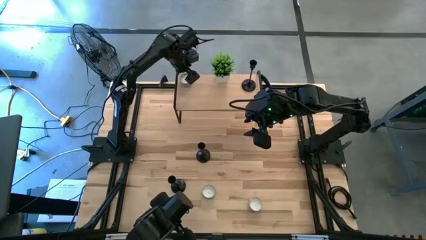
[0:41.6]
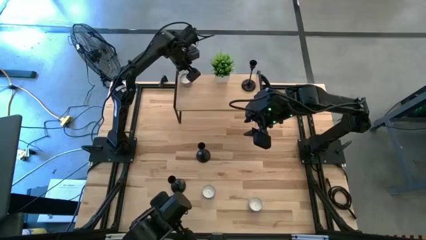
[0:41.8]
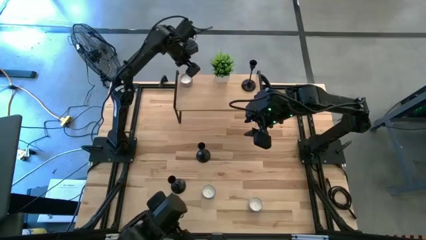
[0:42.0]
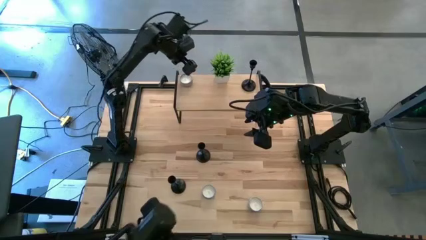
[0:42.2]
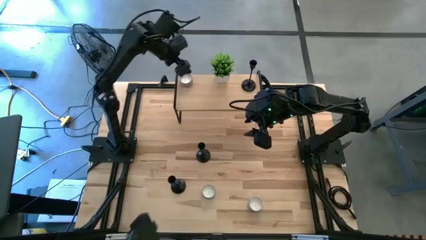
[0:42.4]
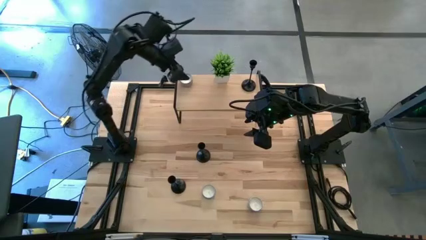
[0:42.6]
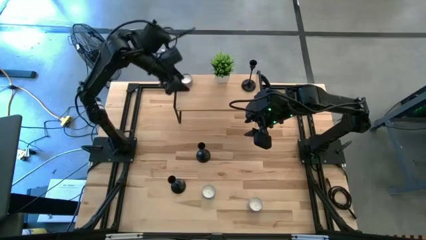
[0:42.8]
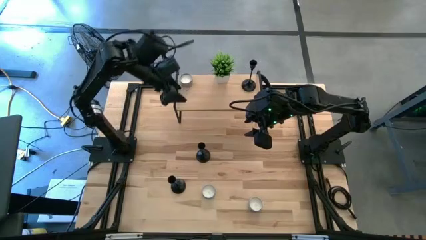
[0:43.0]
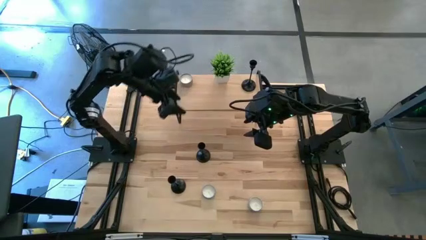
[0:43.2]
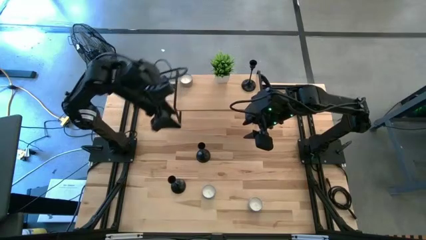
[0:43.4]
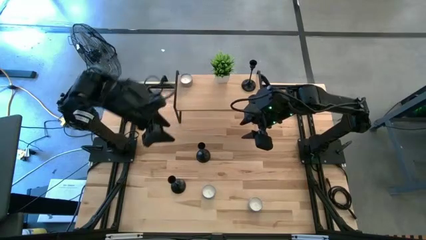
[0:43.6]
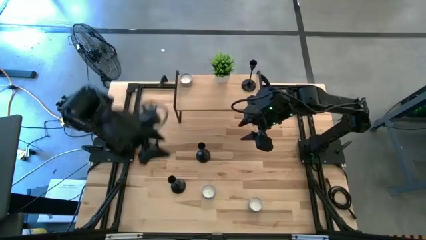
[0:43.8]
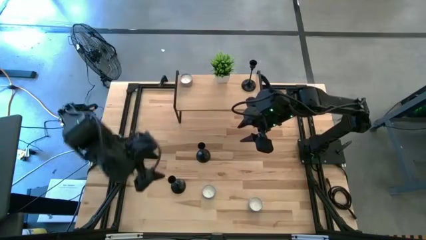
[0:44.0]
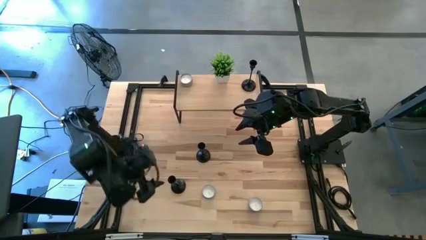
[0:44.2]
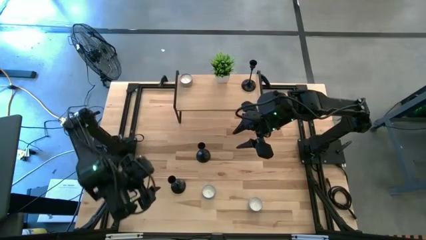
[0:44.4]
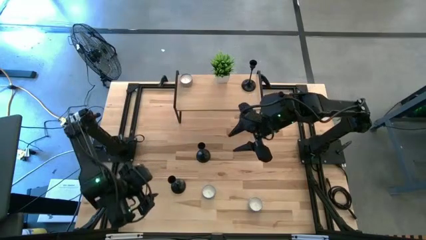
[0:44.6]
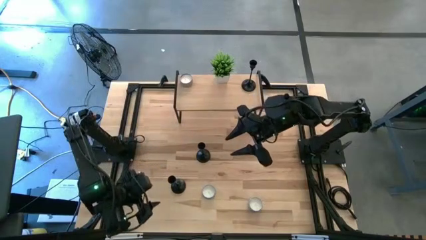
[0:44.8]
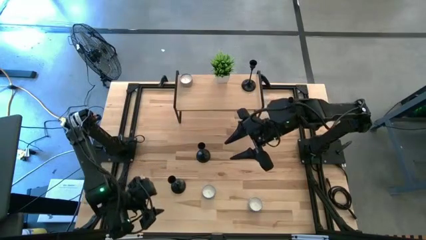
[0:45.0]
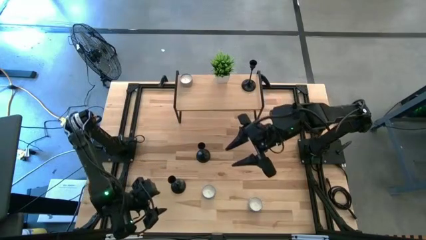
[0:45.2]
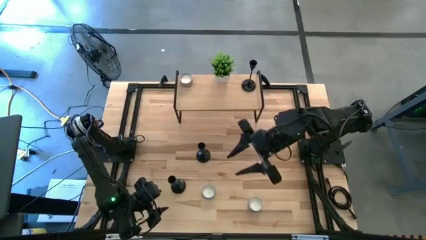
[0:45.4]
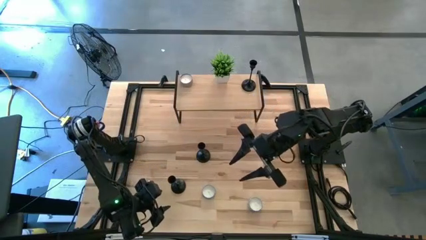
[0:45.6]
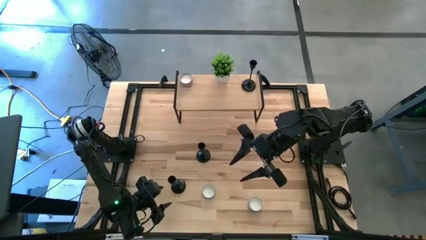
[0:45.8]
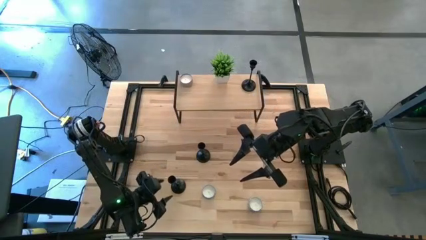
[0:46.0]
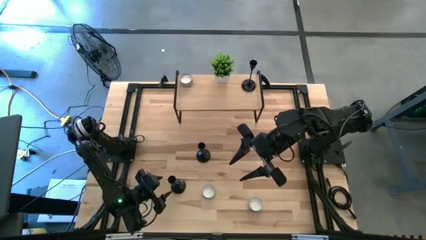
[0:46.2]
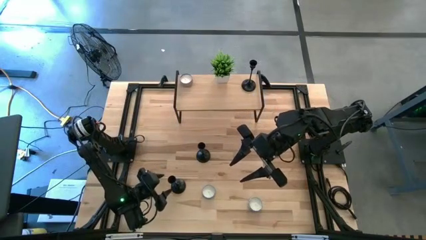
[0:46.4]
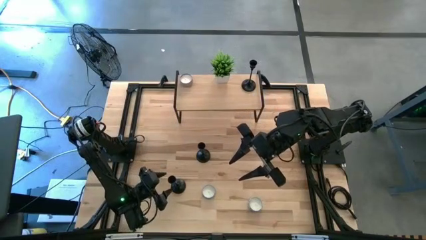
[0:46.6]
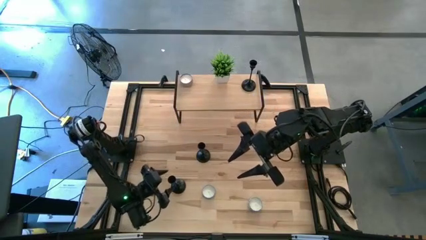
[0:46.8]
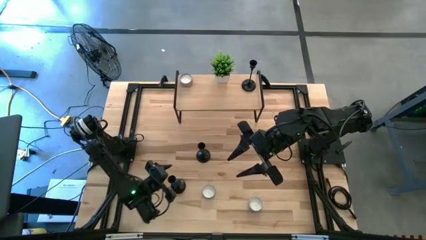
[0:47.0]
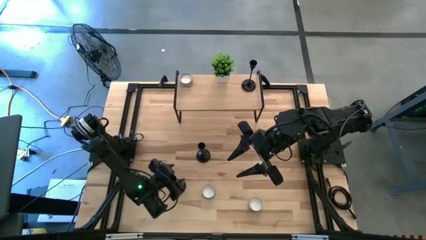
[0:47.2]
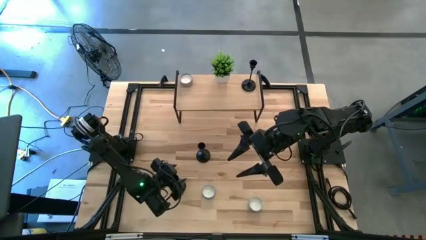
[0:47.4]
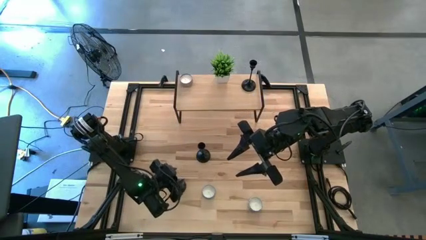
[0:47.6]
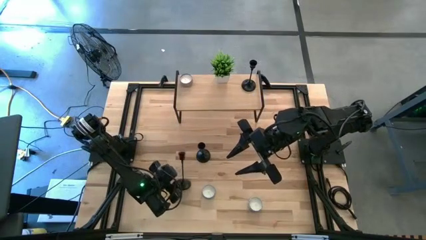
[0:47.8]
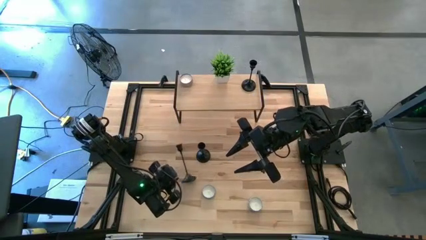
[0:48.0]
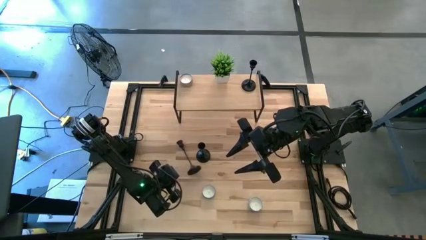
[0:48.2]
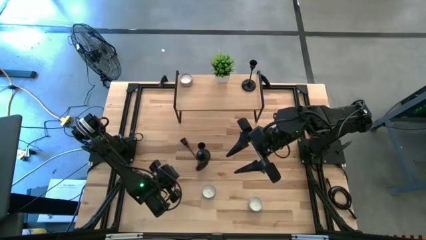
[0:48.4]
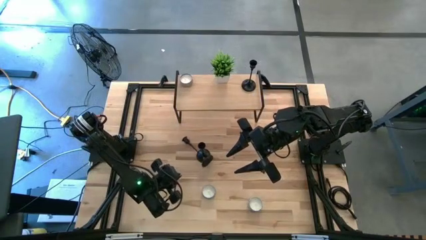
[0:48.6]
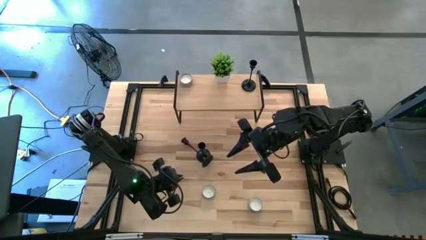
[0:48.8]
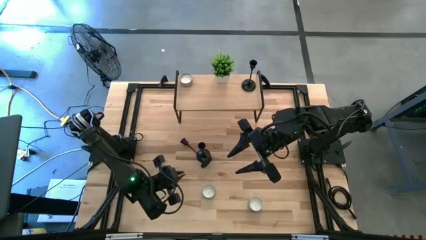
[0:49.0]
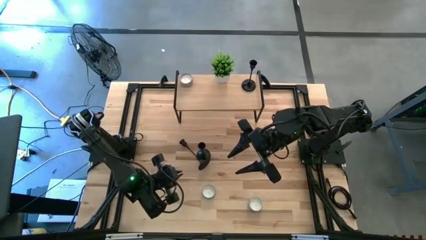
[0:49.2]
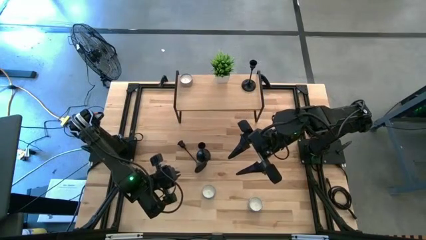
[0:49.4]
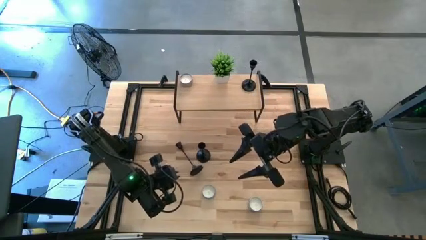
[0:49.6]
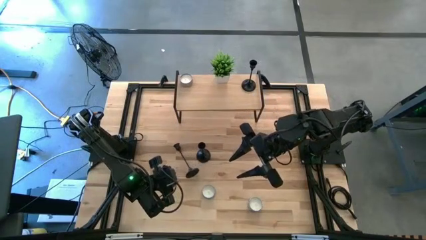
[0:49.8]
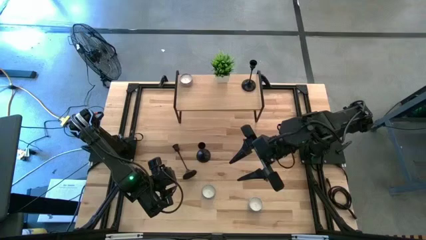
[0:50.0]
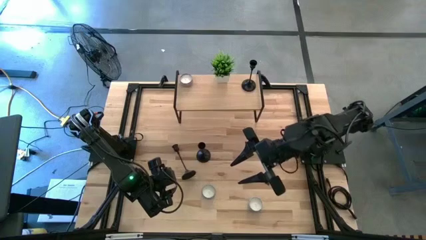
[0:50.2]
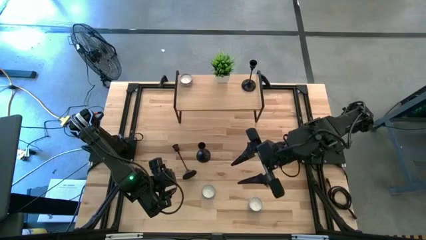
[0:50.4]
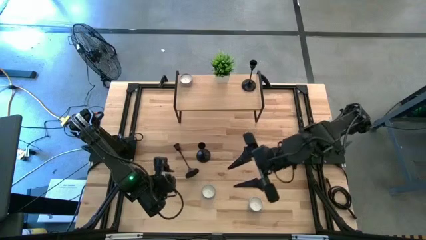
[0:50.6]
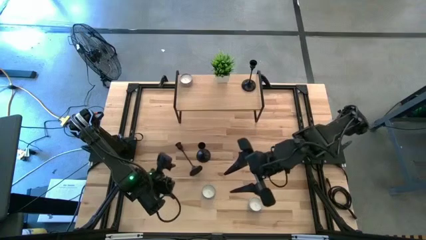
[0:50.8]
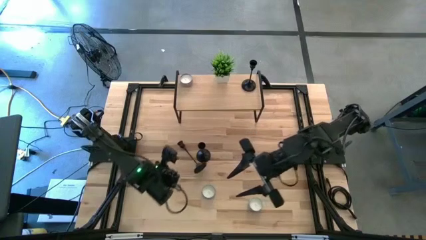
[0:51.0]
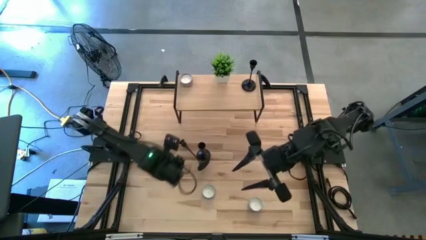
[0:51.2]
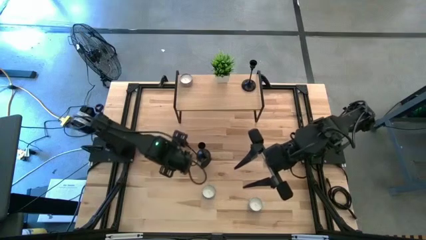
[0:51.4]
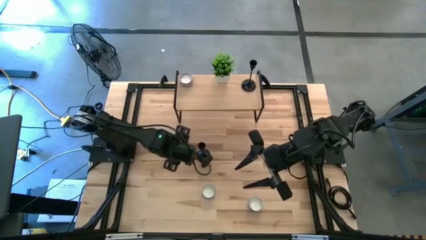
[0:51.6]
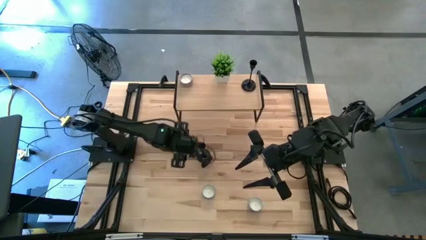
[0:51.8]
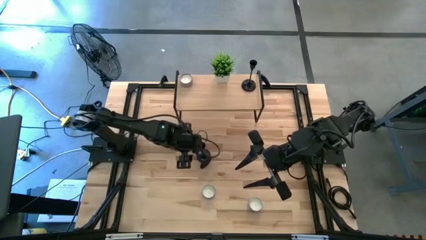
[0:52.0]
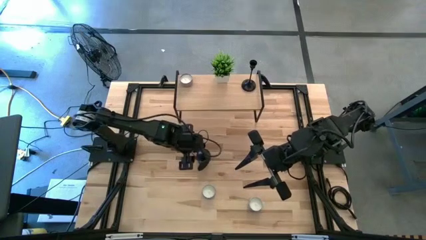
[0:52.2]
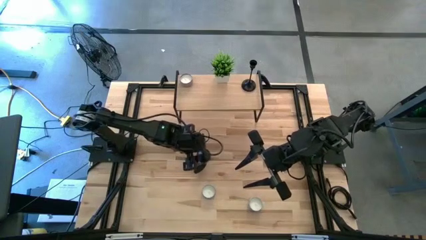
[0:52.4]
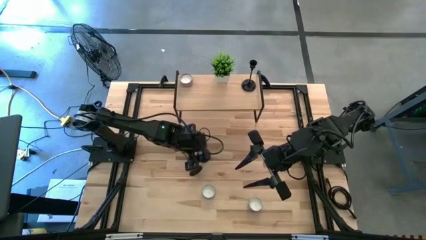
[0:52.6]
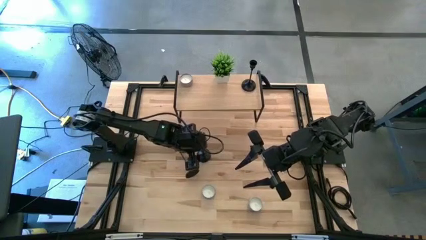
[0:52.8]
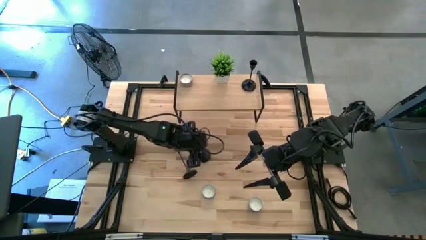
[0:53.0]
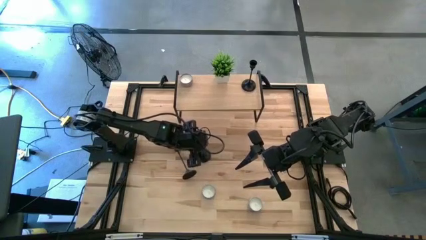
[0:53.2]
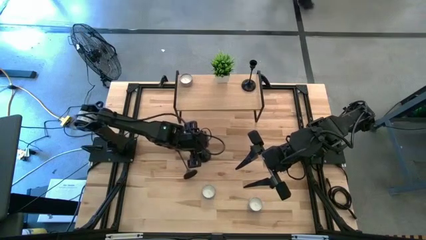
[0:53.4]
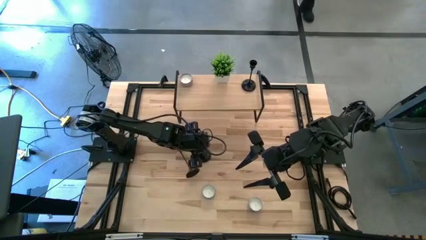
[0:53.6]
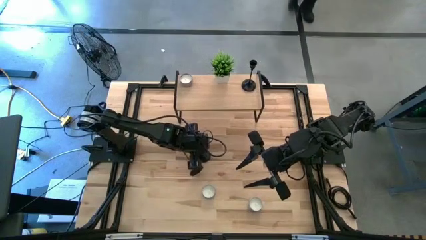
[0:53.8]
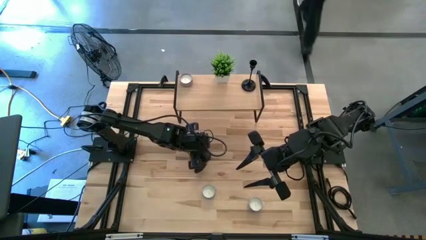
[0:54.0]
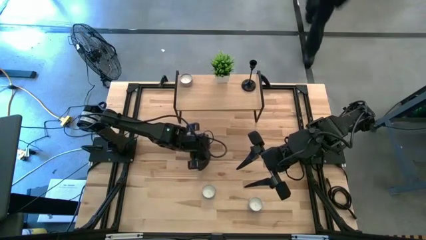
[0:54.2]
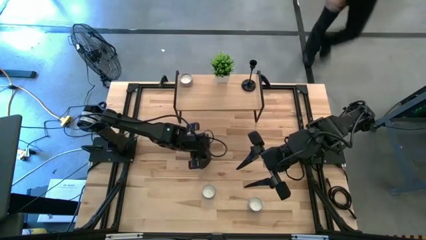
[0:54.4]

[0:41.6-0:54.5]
Task: Pick & Place candle stick holders
Put the left black candle holder on the shelf

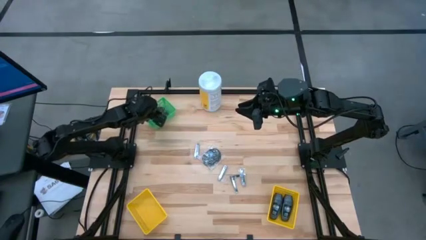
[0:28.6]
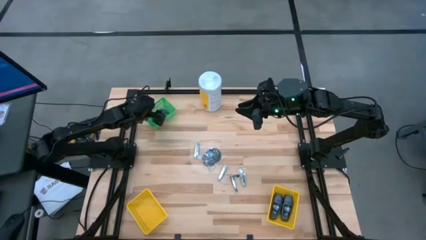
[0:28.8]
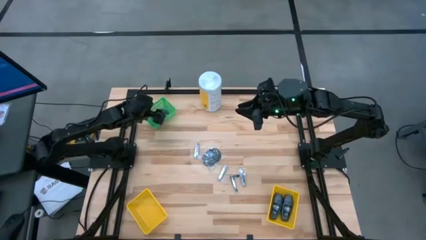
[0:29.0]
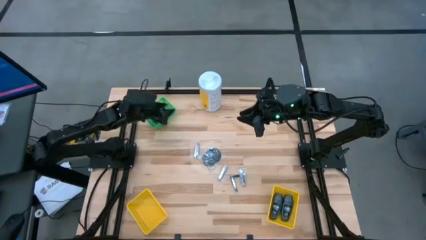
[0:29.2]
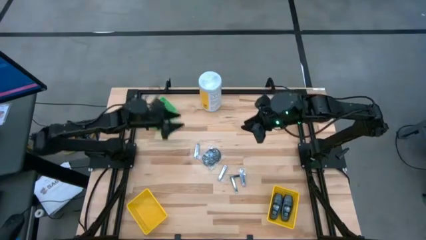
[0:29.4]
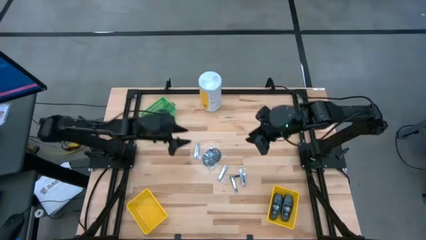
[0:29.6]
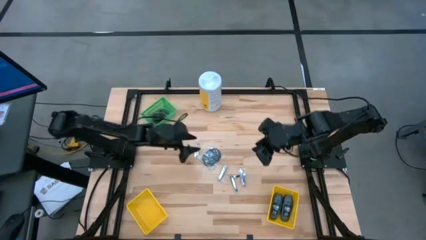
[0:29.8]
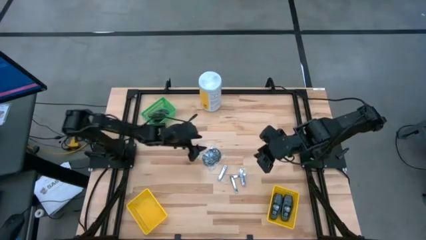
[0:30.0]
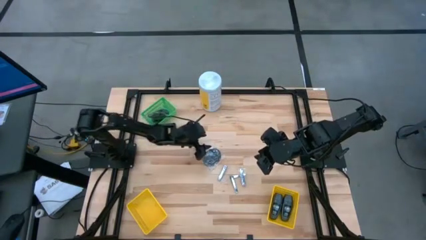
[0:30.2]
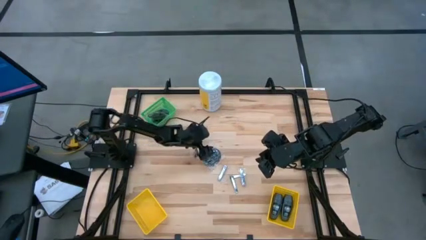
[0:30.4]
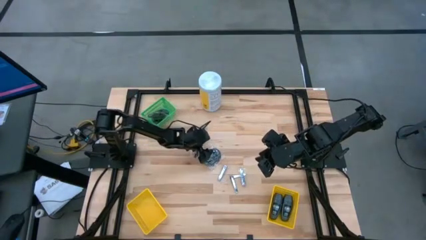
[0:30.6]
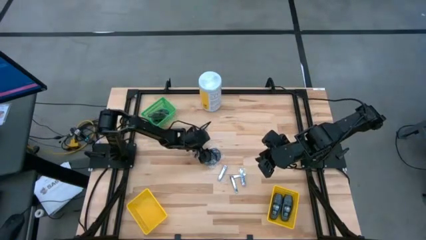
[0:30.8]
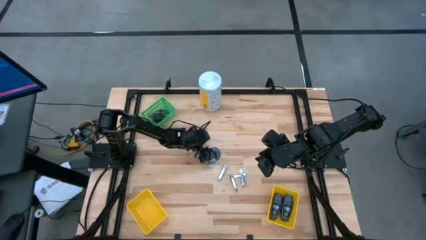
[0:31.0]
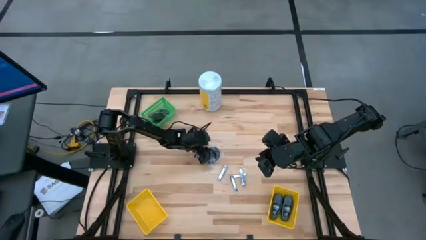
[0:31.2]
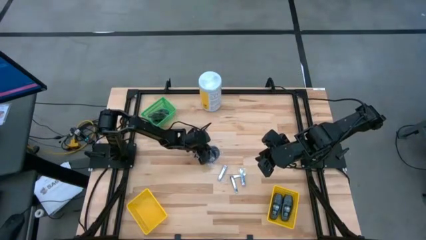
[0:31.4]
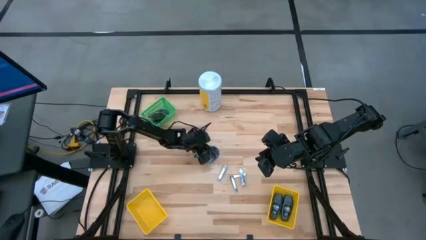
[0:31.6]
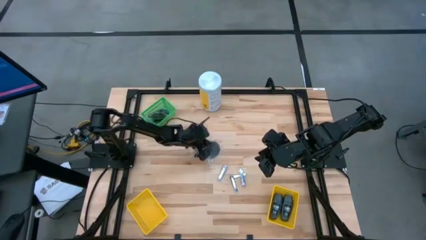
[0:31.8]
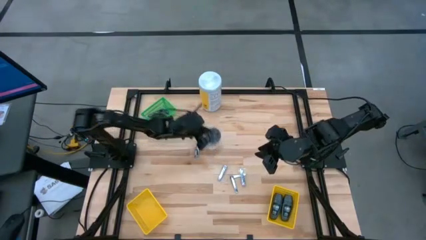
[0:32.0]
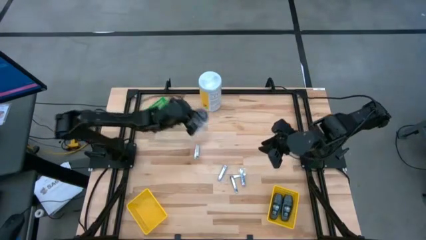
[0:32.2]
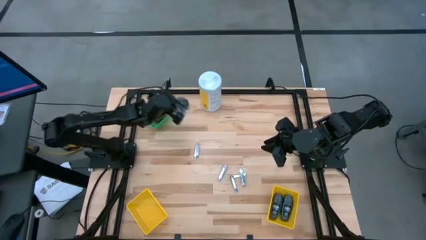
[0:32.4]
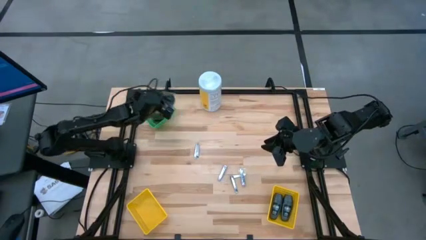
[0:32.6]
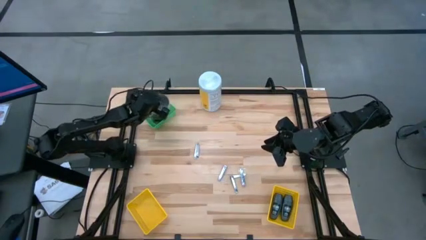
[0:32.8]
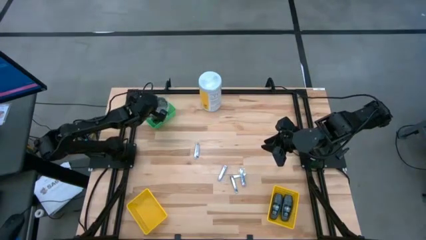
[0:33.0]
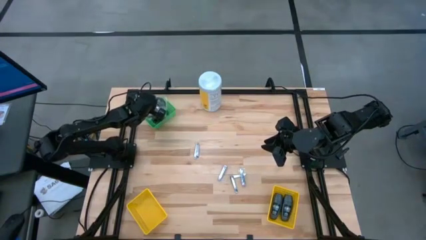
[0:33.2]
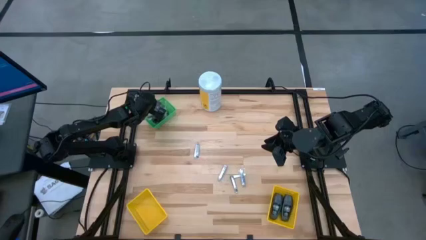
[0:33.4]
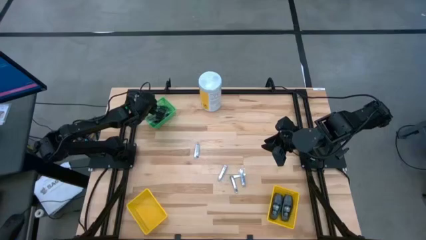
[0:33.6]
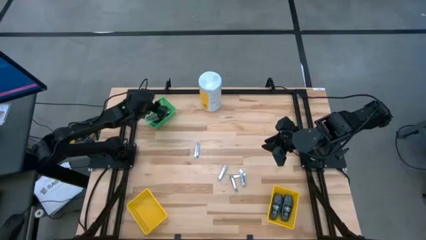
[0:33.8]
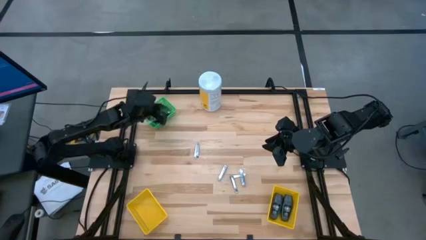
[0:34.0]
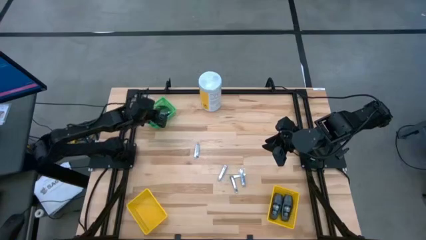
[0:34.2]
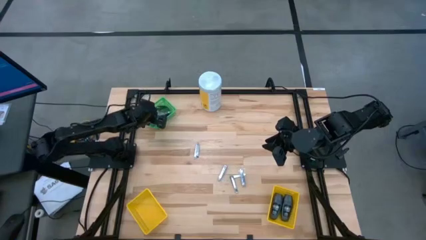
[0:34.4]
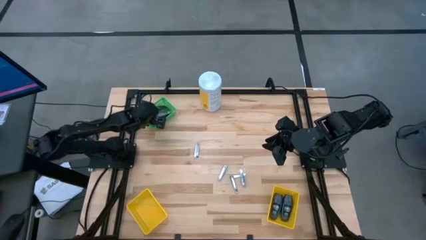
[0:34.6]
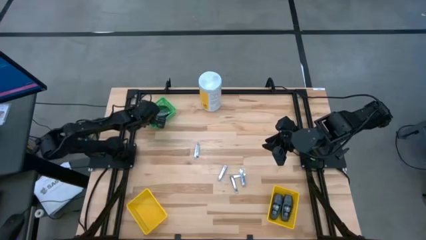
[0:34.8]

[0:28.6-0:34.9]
Task: Pick & Place Travel size toiletries
Put the black hairbrush into the green bin
